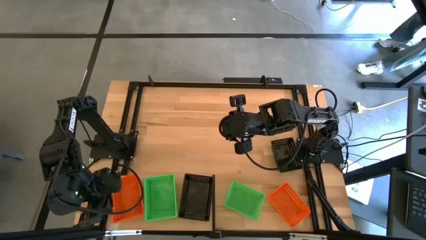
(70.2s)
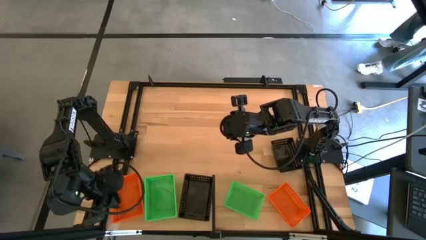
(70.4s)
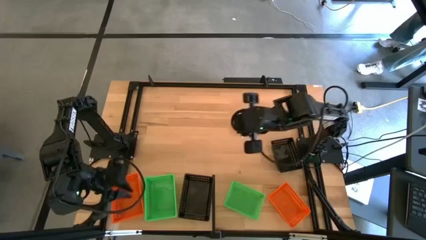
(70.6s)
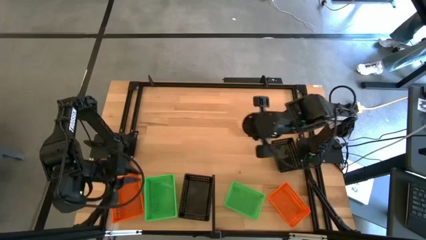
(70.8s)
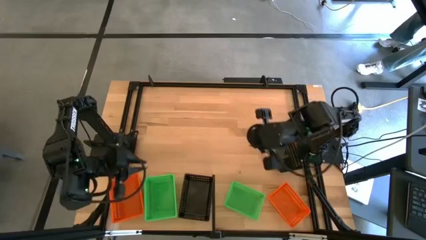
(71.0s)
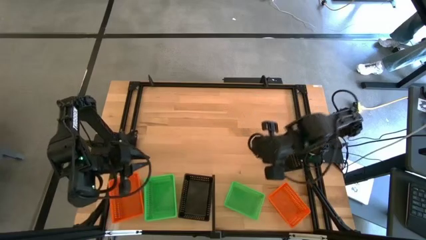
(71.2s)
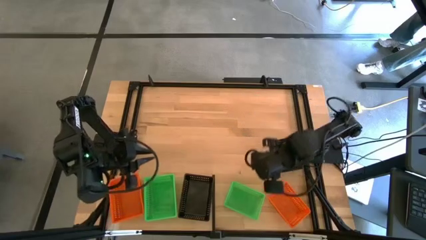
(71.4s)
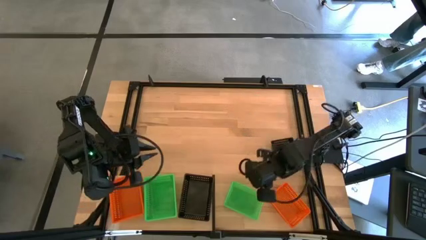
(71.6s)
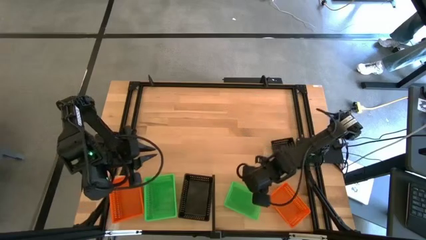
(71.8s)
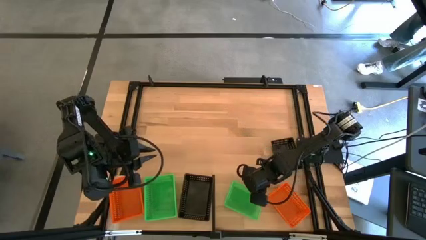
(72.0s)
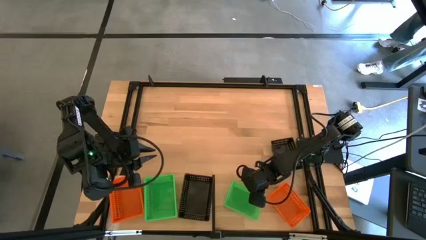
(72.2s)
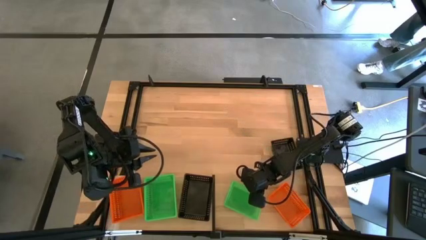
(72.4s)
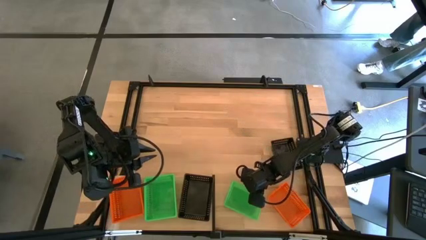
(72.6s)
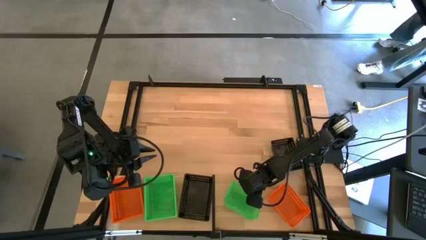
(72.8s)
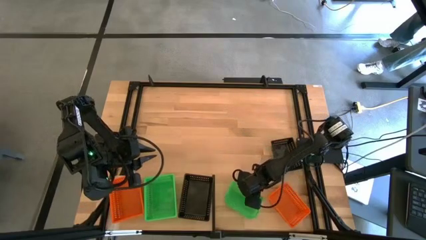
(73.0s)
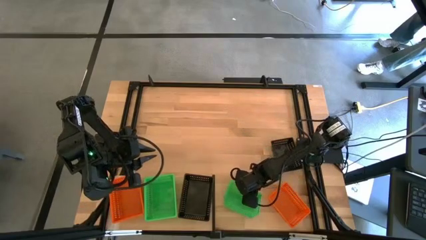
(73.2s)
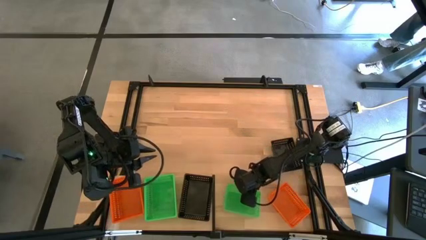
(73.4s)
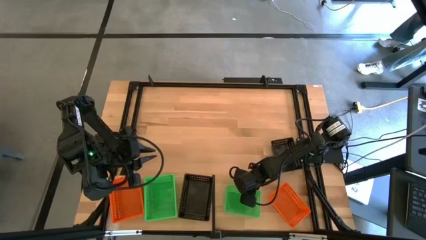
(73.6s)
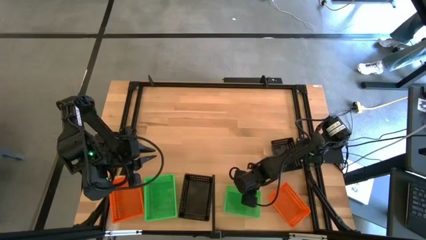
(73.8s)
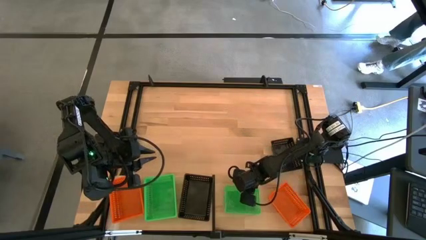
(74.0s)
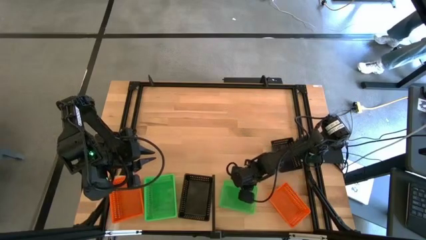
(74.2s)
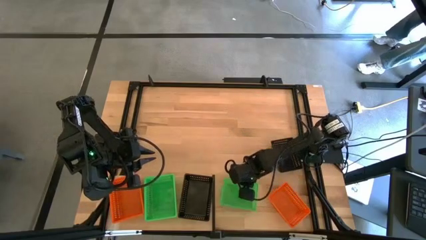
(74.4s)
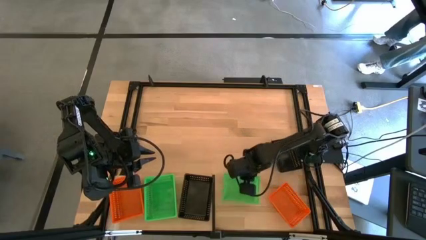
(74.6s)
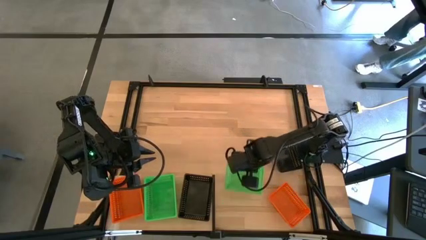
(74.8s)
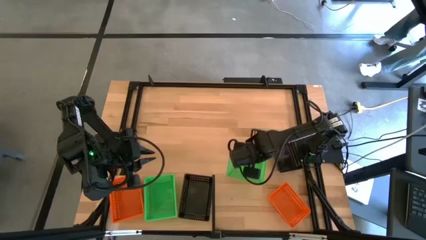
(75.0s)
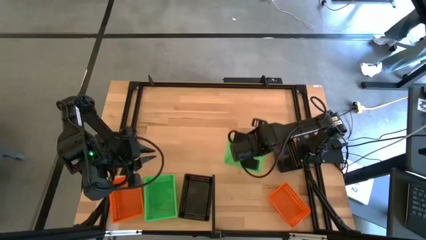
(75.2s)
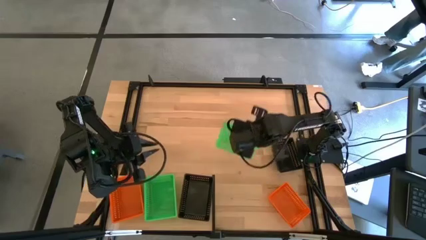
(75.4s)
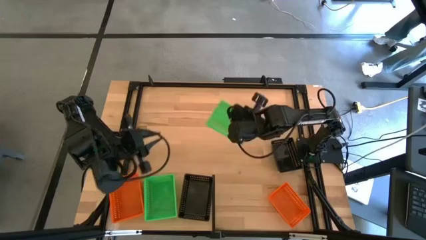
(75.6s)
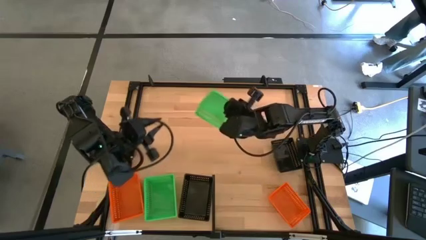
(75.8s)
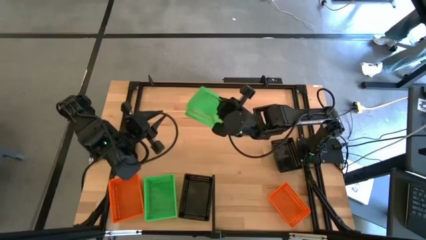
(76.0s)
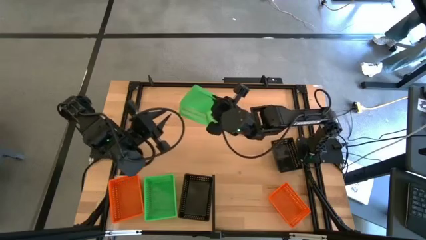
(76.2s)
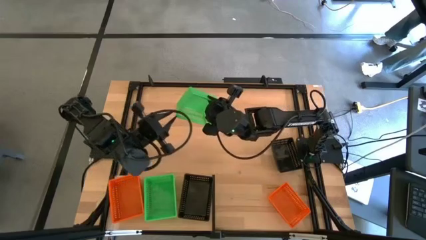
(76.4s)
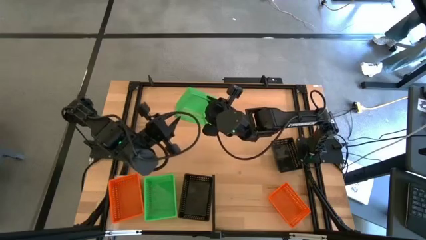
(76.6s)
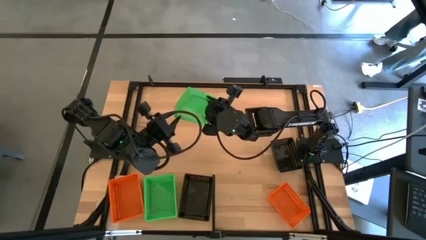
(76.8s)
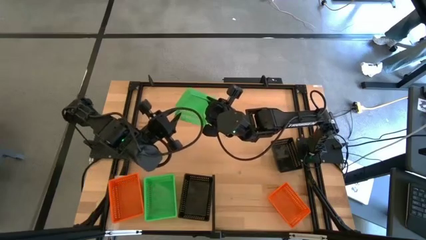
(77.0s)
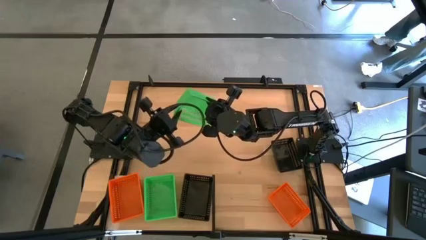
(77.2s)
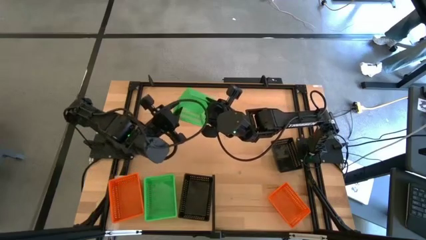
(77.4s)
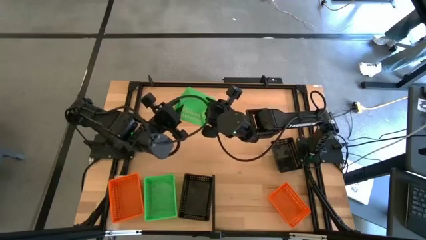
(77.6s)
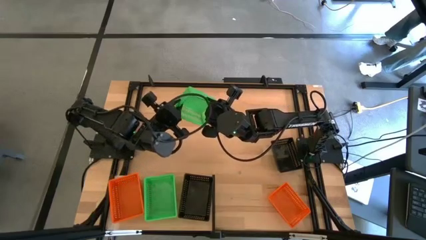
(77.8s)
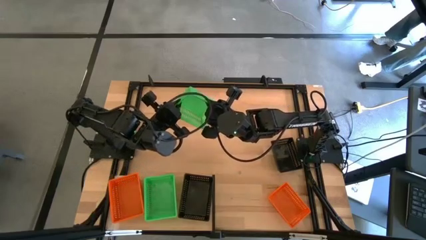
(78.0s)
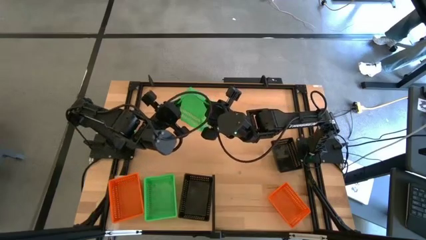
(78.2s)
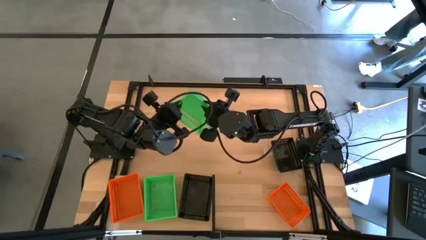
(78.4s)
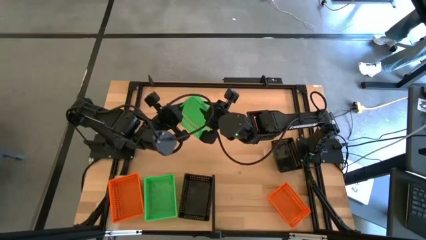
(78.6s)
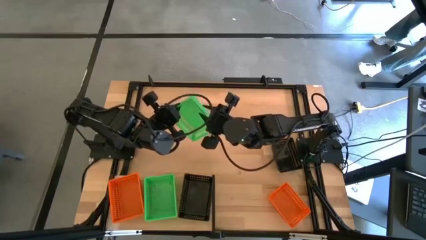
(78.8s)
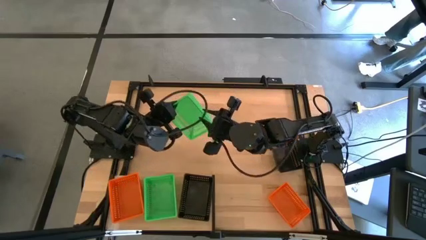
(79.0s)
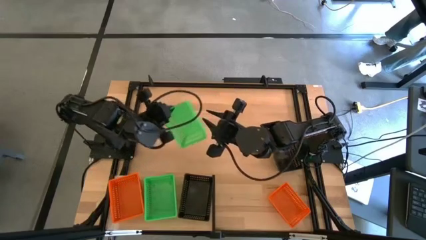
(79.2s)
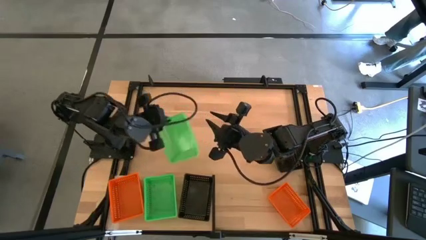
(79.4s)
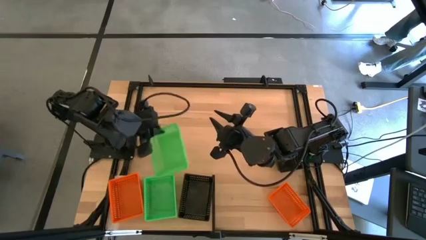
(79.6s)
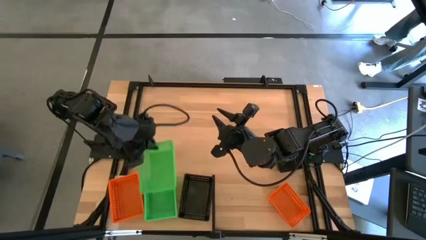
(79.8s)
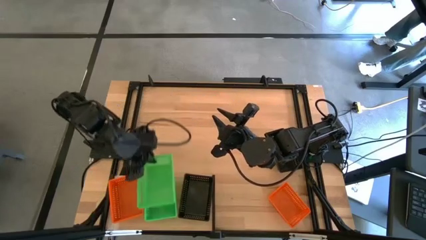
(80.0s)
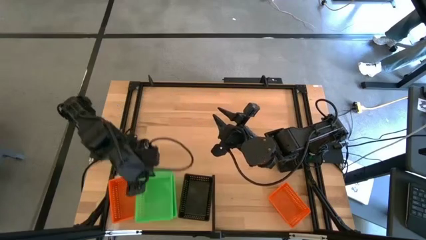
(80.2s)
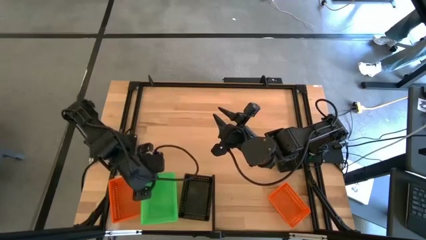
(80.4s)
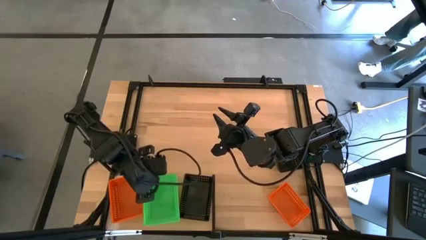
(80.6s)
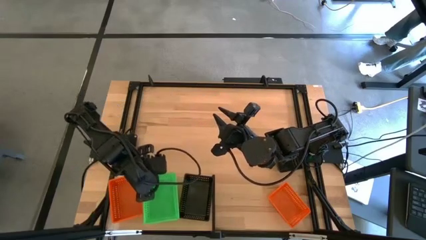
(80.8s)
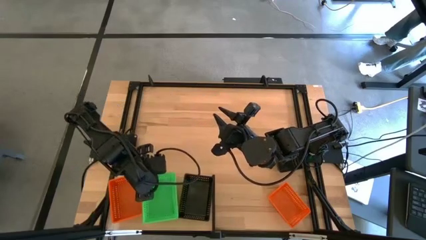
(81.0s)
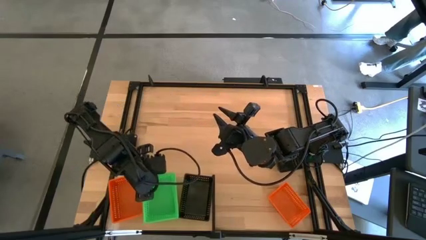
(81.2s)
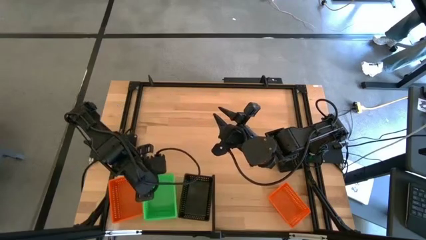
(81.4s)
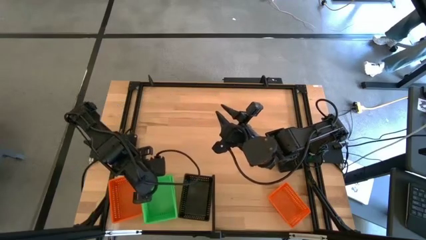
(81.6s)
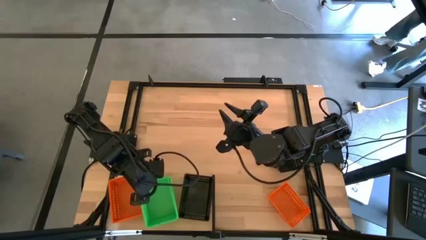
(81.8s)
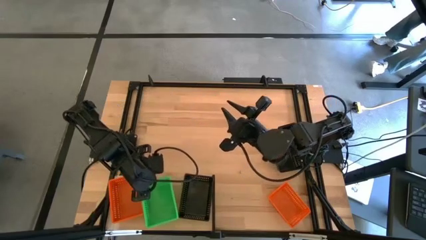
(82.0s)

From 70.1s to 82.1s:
Task: Stack baskets on shelf by color
Stack the green basket on top of the other green baskets on the shelf

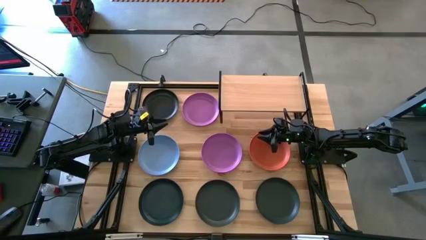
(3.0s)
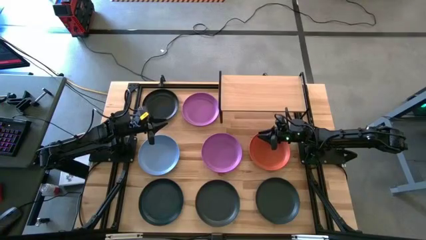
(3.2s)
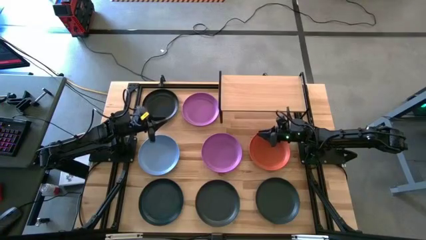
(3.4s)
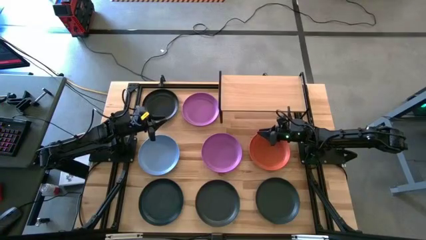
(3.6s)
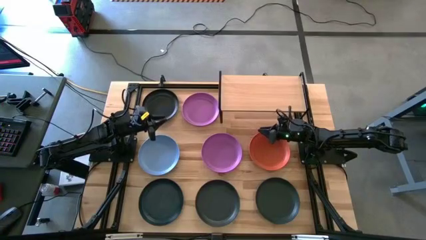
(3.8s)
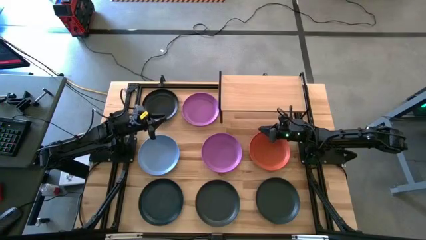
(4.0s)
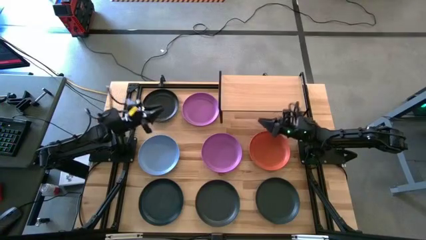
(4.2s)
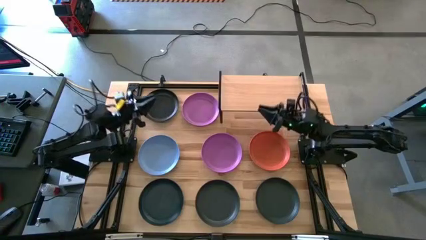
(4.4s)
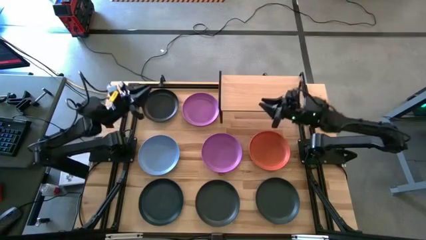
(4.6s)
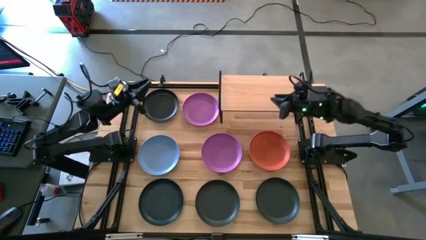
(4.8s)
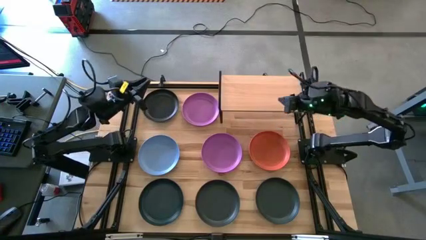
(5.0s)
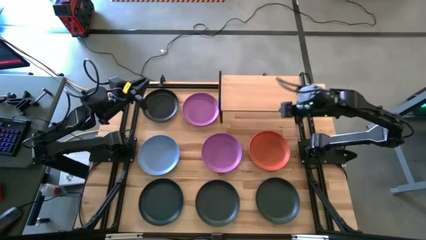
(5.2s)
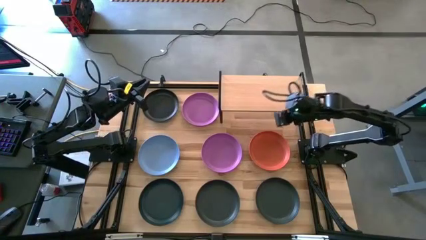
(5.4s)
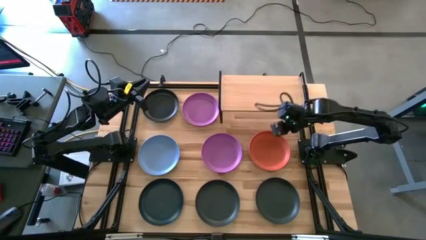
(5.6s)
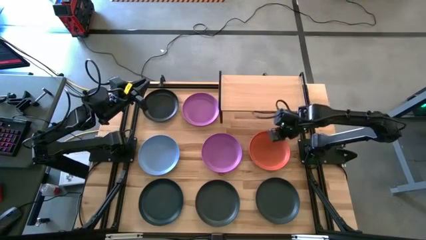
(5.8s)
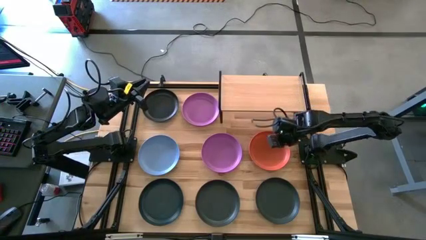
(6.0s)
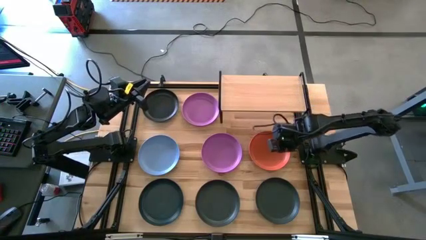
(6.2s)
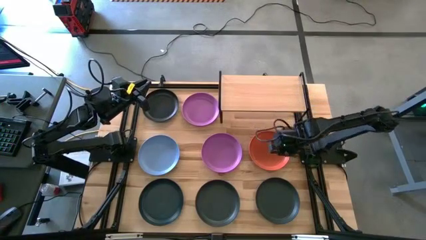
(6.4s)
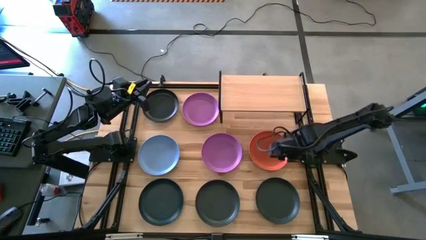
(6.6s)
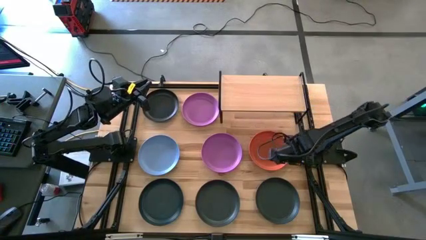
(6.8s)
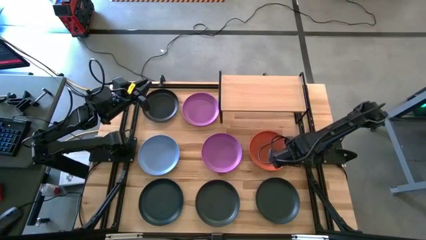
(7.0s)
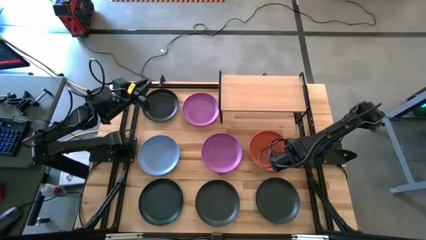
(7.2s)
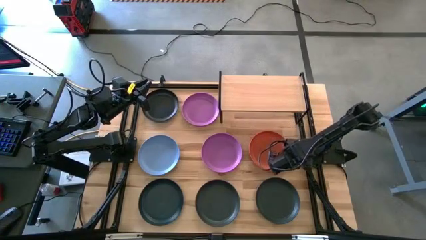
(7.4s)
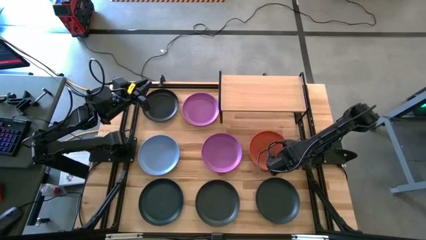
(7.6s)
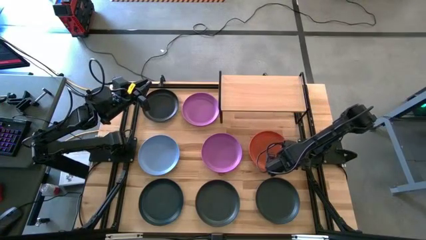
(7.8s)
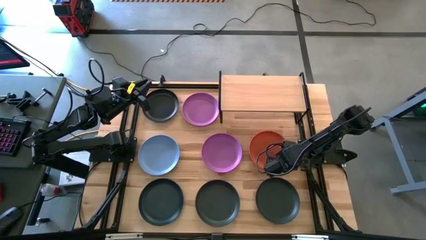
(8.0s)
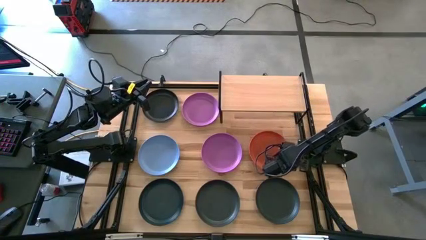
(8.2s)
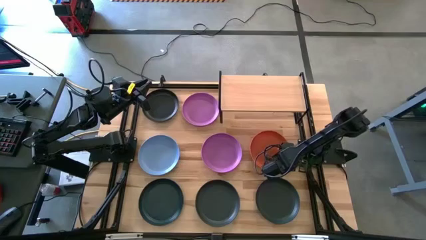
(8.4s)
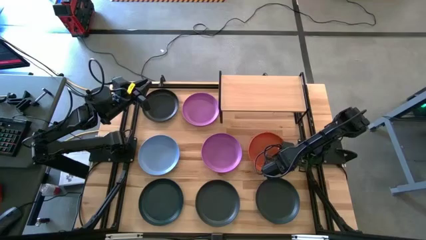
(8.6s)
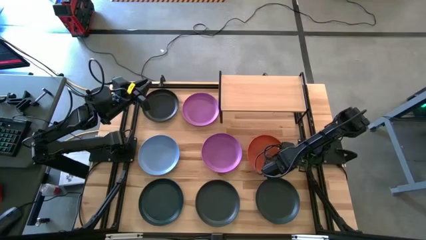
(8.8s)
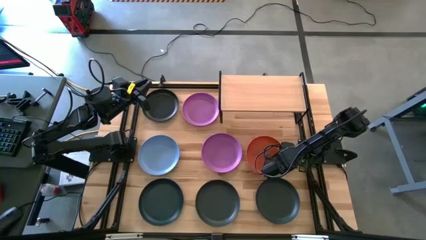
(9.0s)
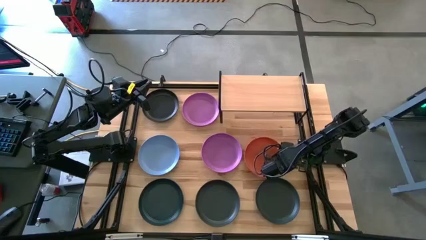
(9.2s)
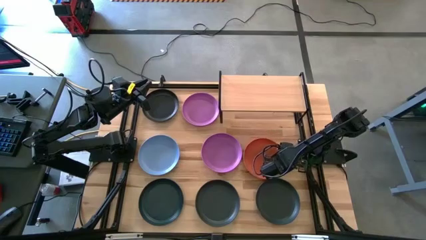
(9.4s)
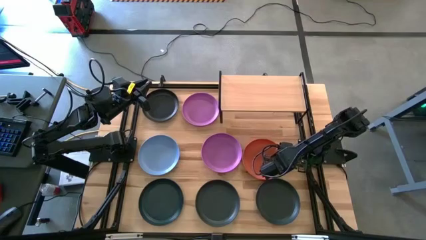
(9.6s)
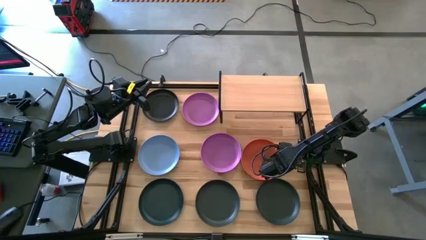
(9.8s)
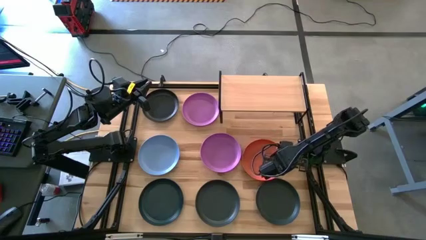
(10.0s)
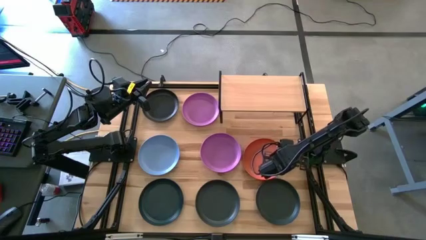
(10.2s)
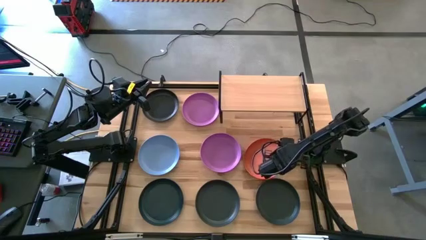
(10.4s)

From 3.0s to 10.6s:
Task: Place and stack plates onto a shelf
Put the orange plate on the shelf
